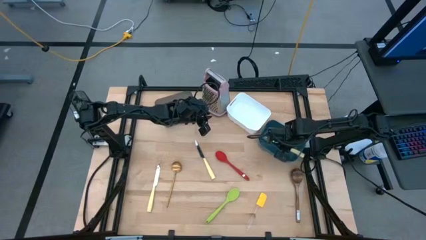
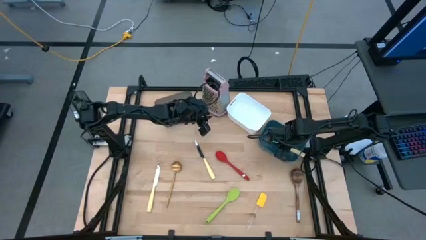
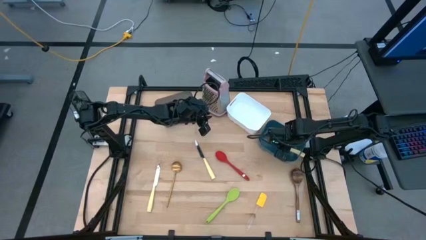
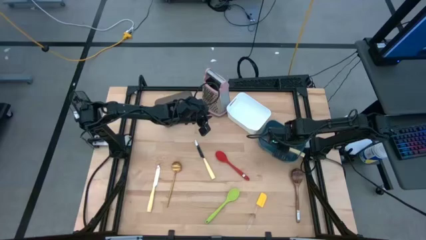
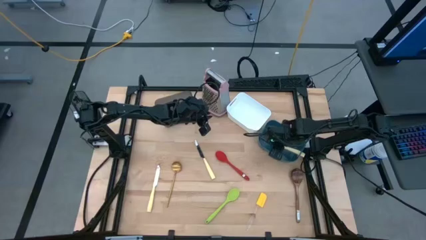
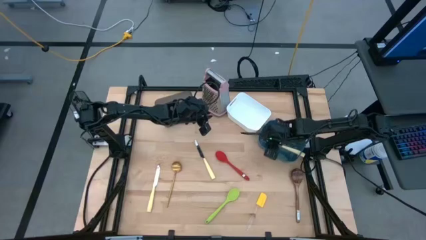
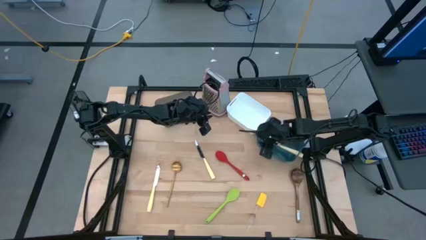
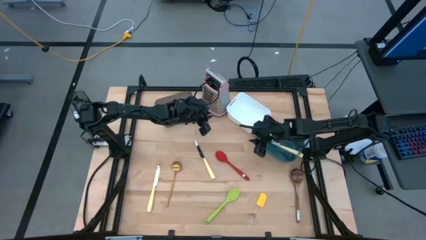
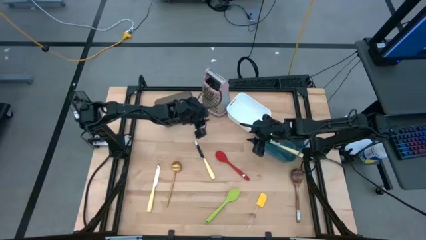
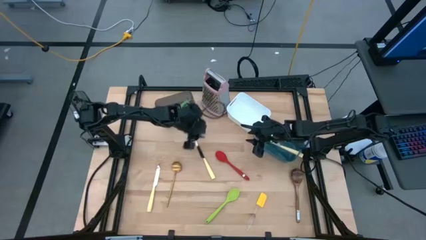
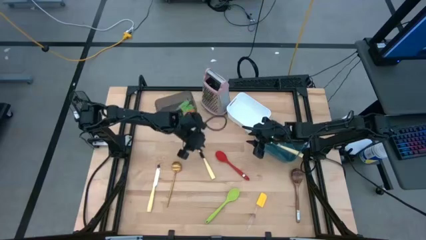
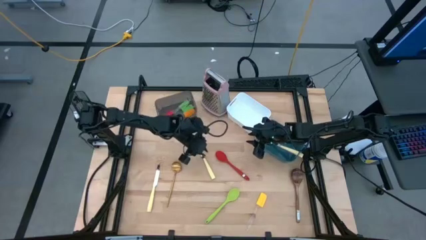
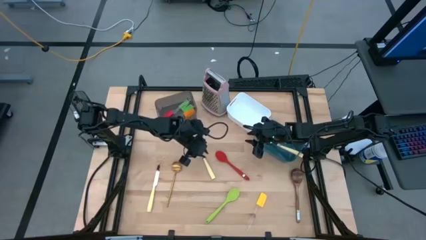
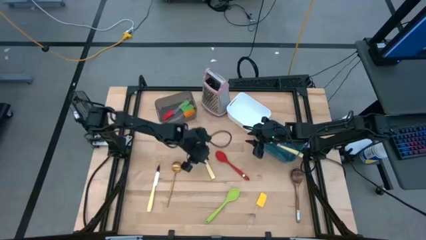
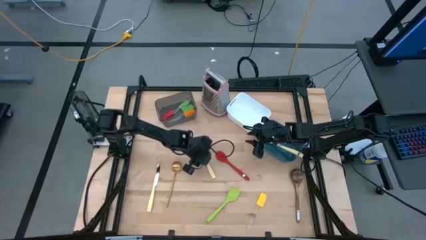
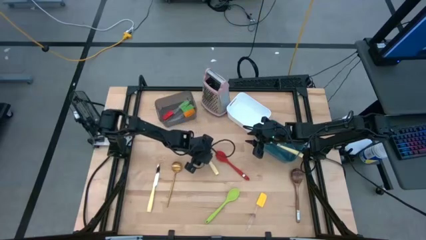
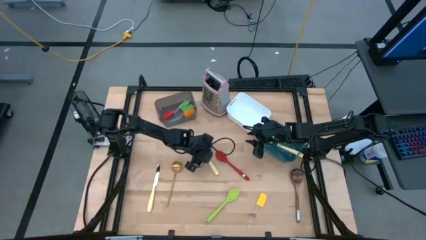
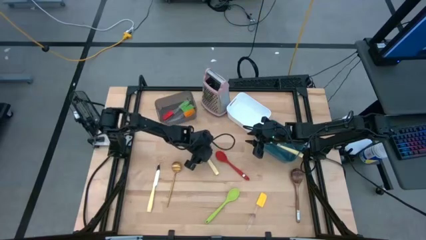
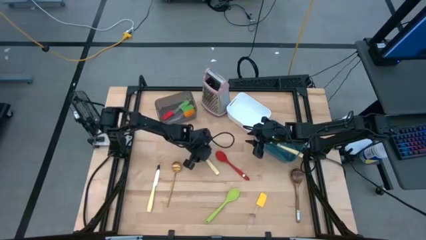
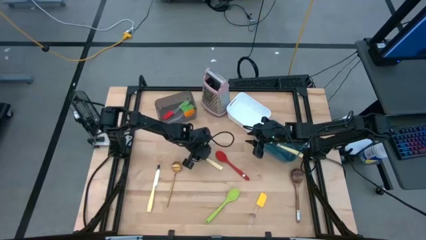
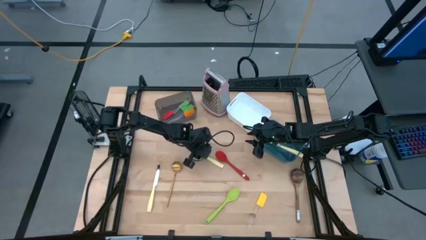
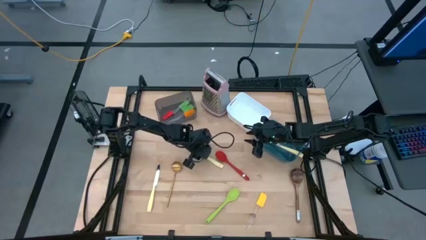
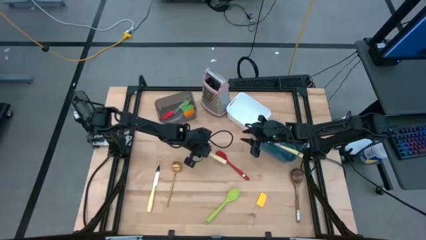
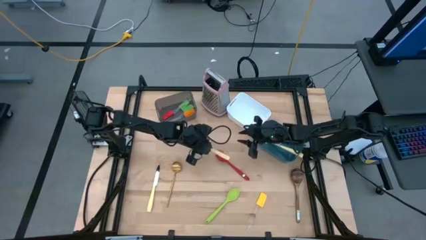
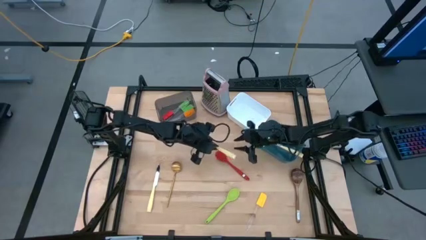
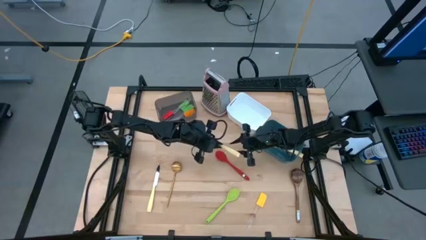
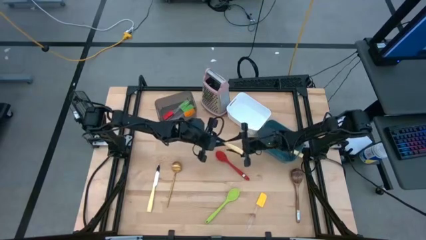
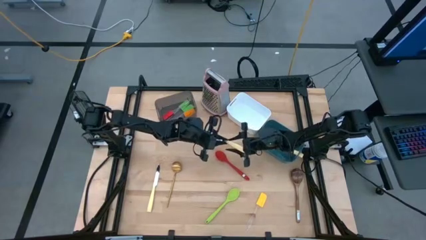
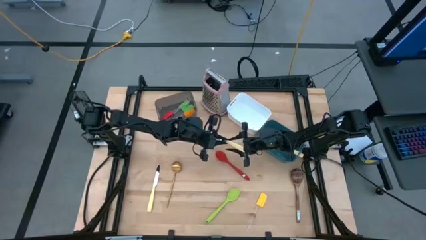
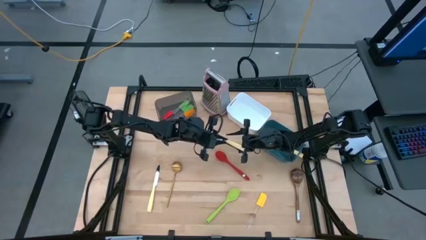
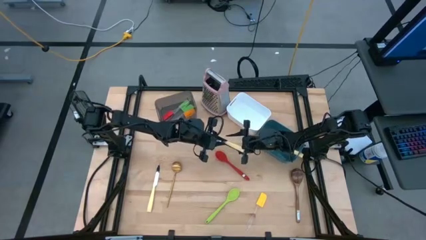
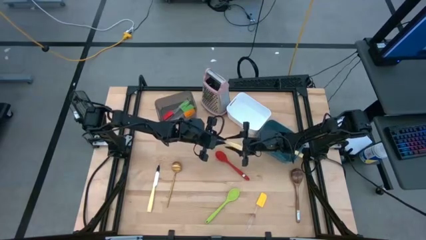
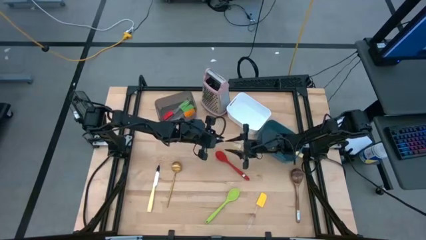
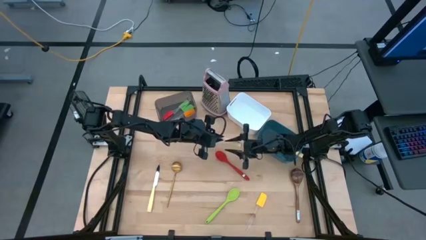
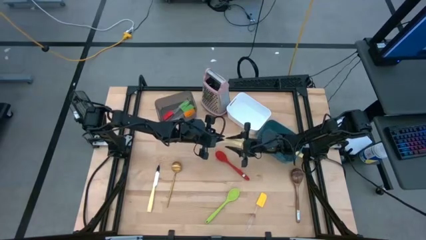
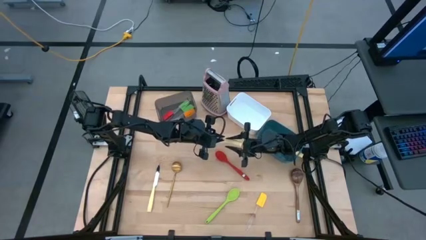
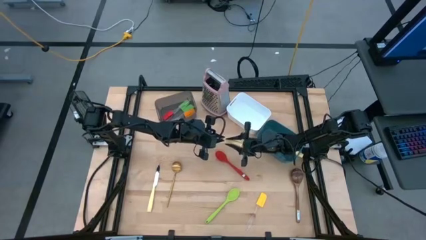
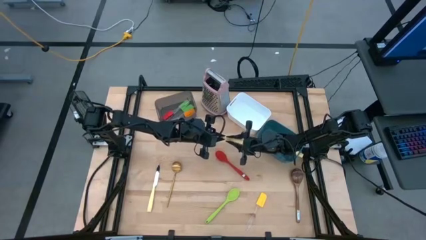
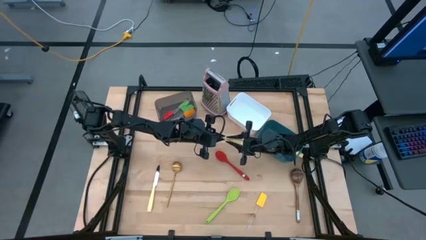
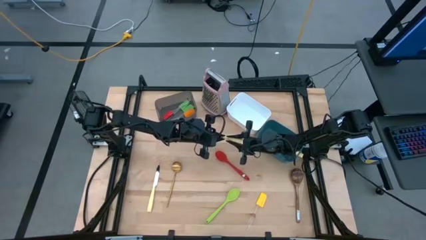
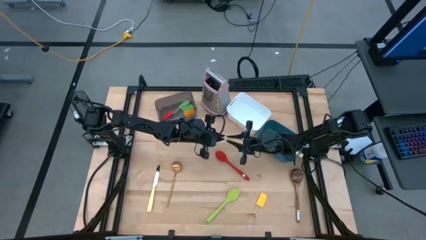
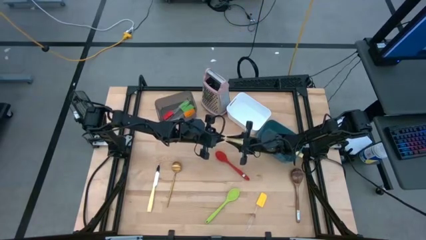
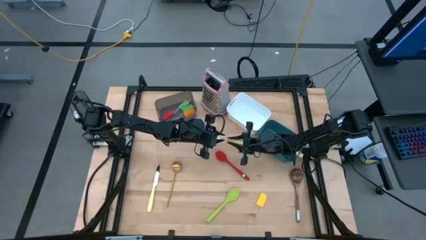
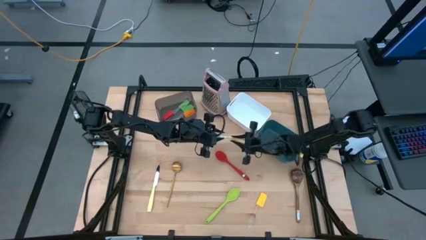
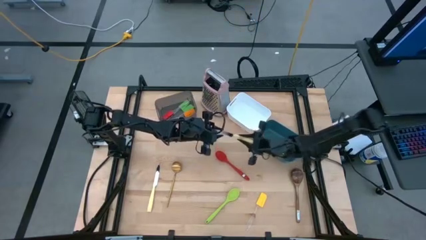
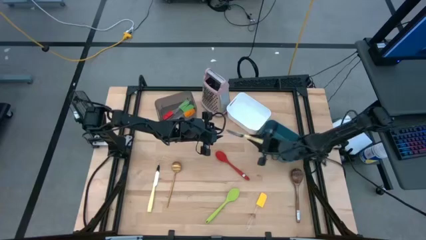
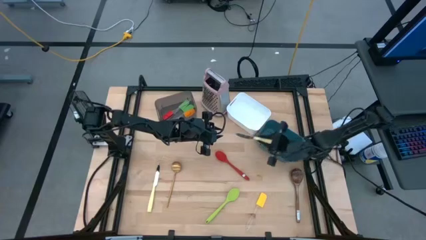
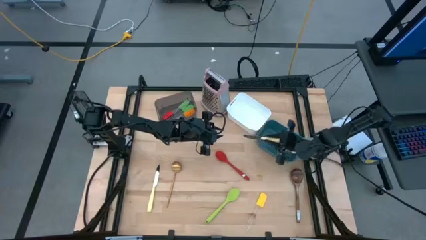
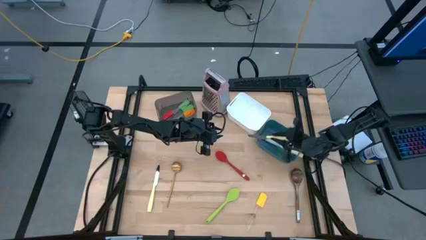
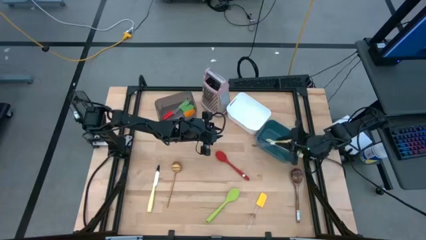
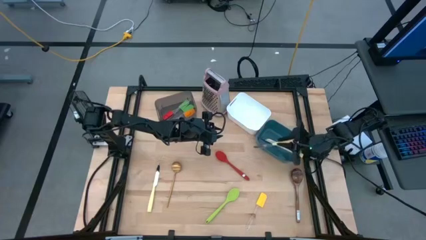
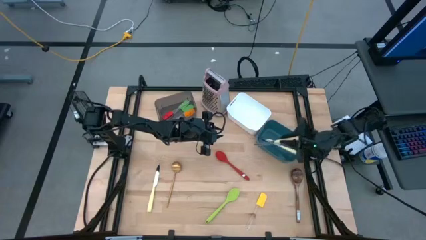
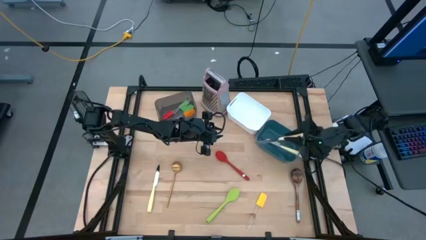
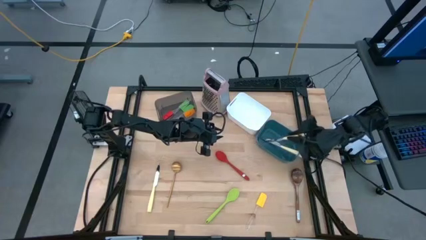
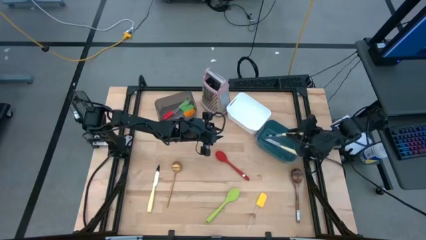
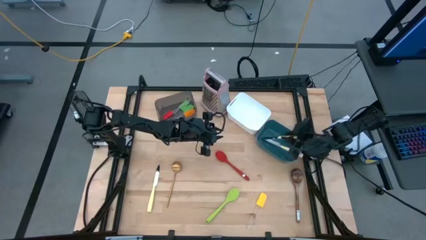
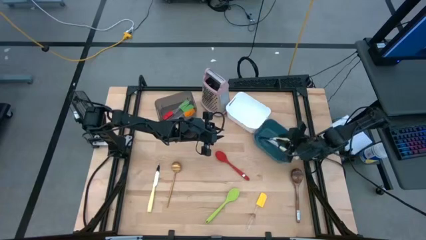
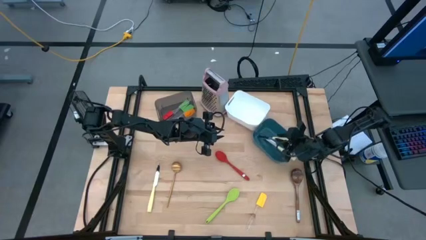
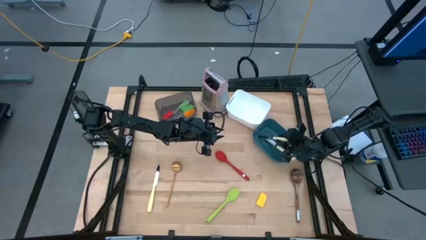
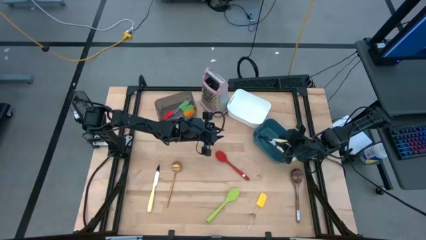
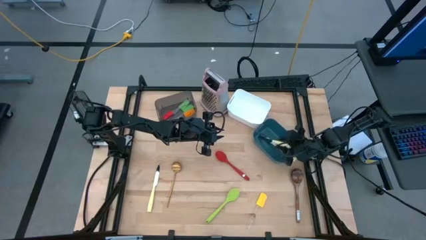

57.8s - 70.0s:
Task: Pick & Place Kitchen Items
Put the top yellow table knife into the blue bin
